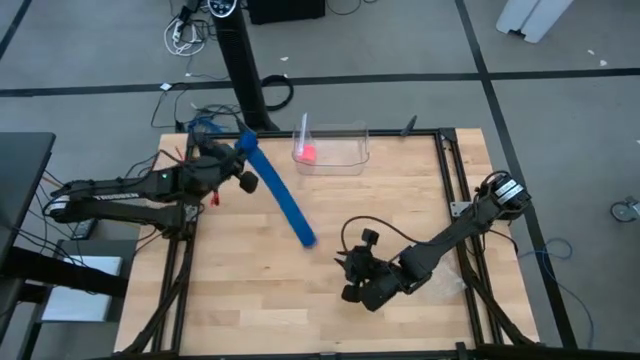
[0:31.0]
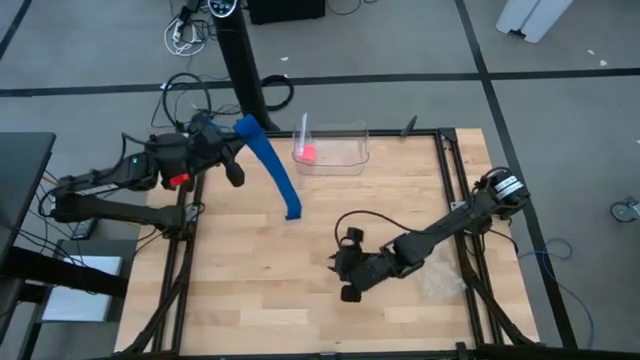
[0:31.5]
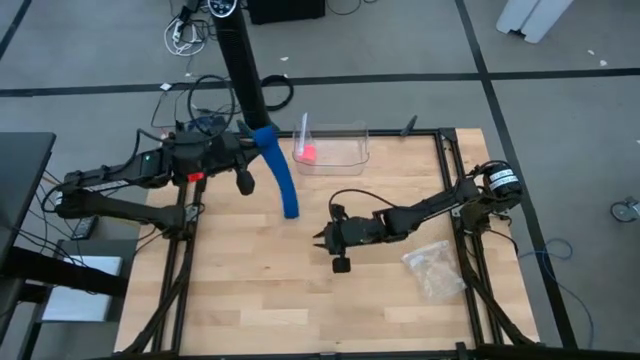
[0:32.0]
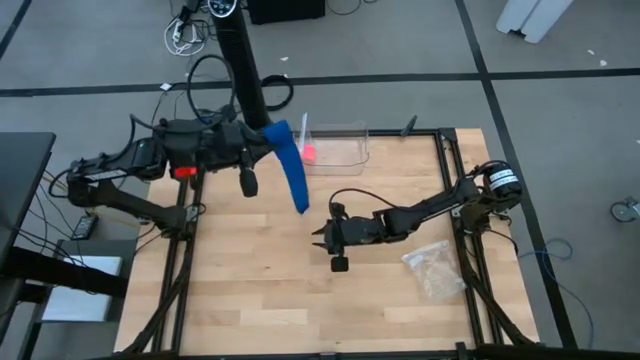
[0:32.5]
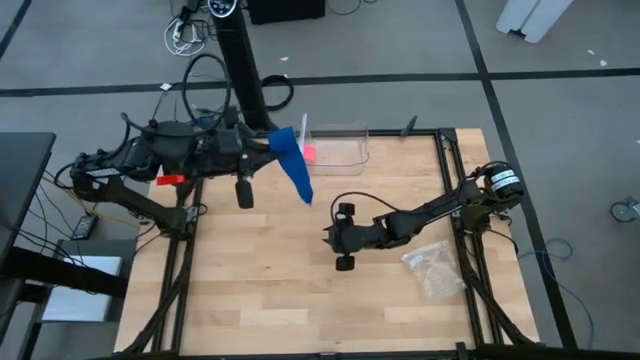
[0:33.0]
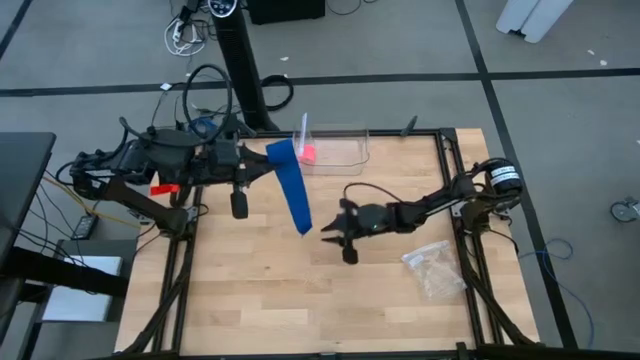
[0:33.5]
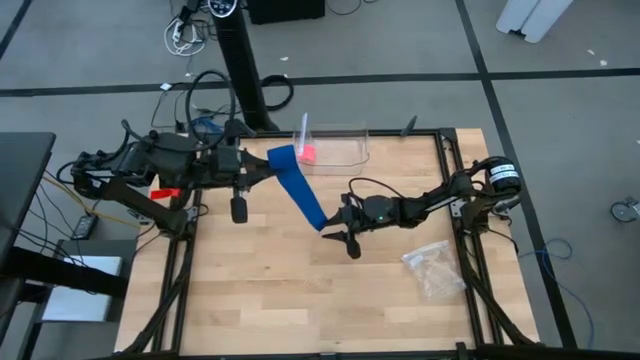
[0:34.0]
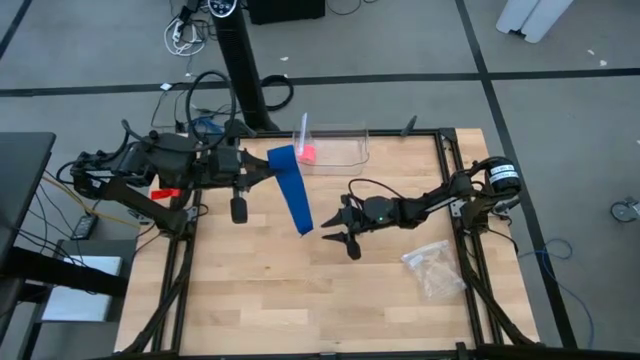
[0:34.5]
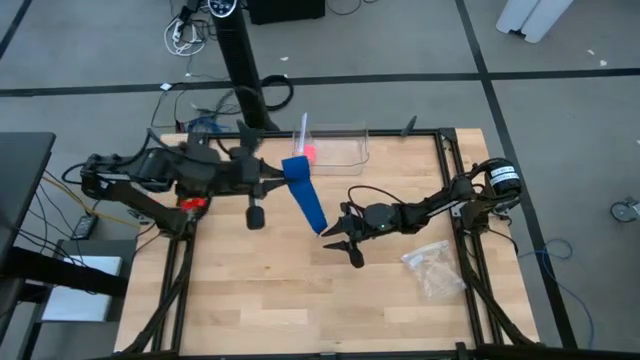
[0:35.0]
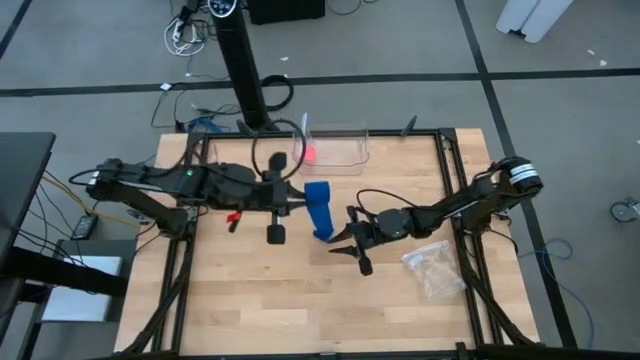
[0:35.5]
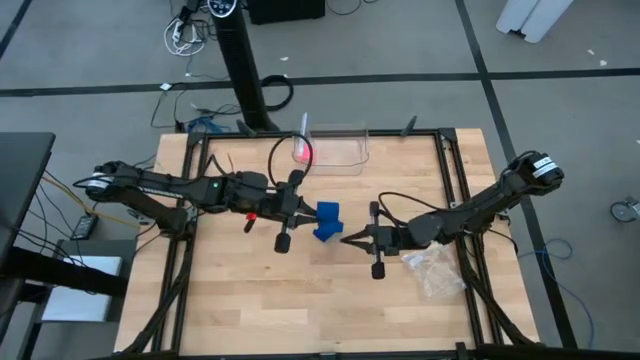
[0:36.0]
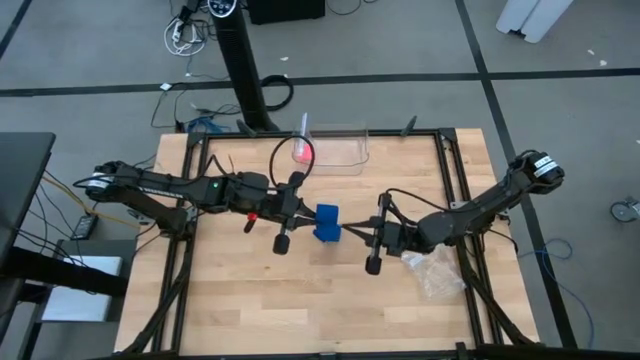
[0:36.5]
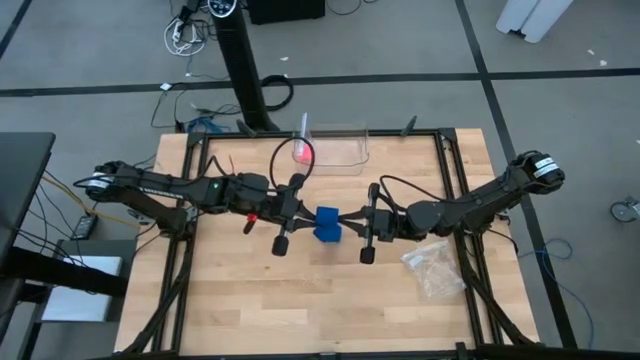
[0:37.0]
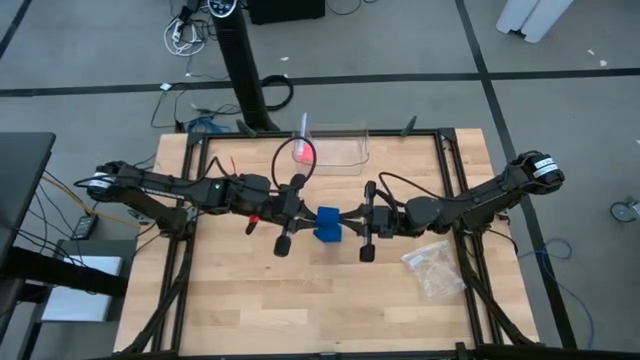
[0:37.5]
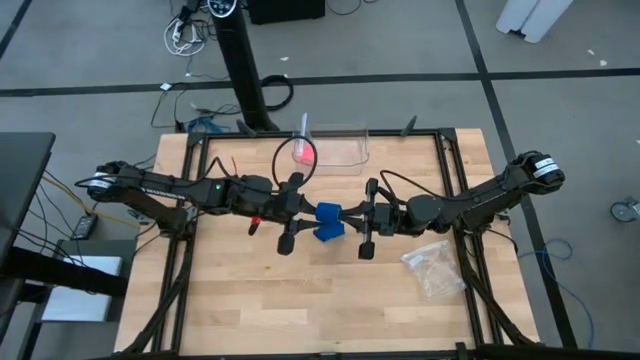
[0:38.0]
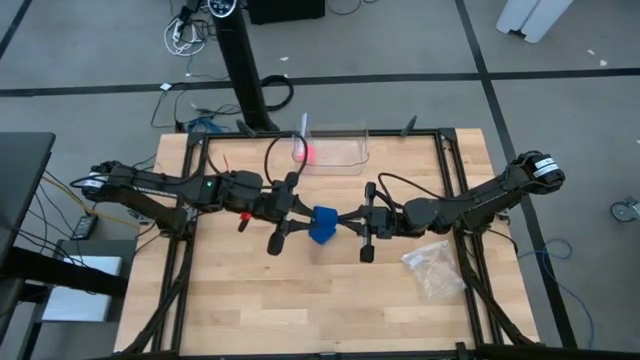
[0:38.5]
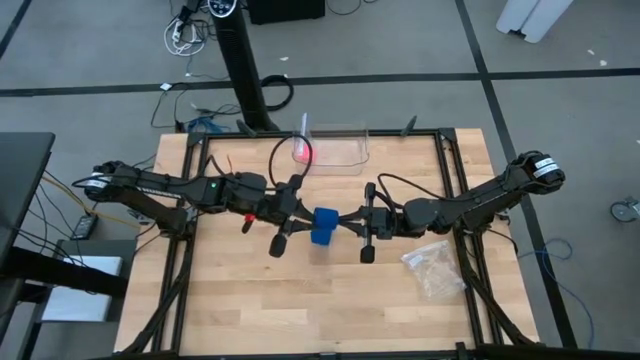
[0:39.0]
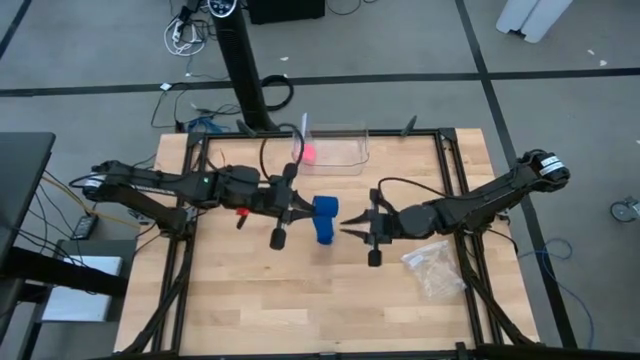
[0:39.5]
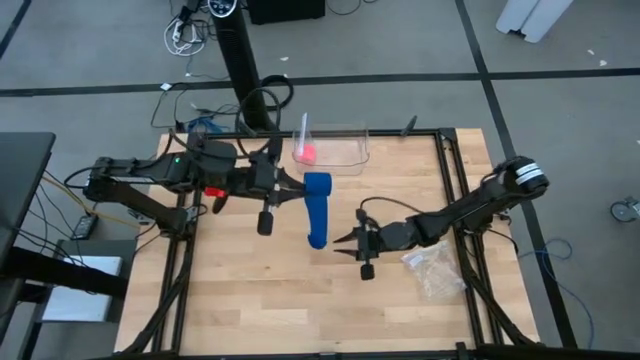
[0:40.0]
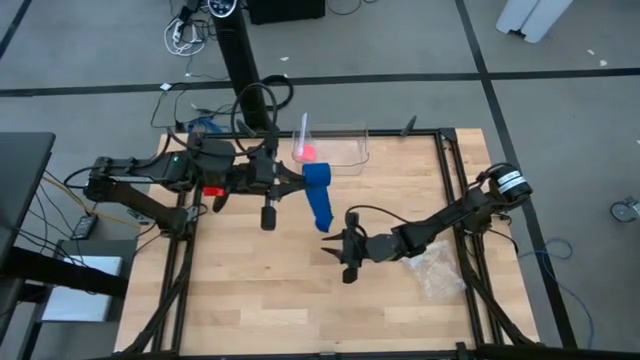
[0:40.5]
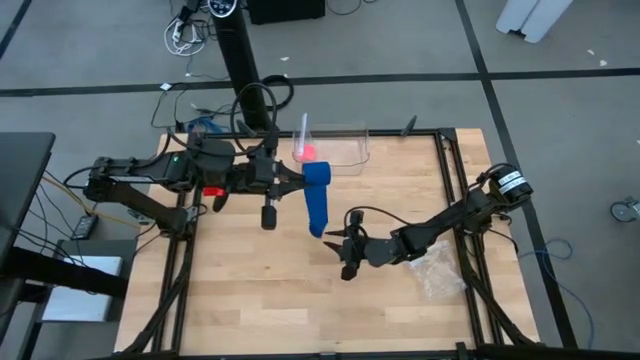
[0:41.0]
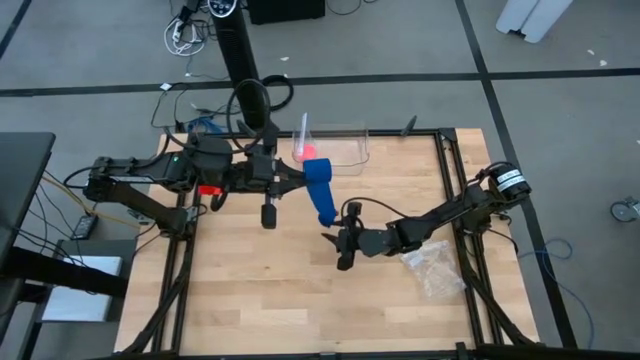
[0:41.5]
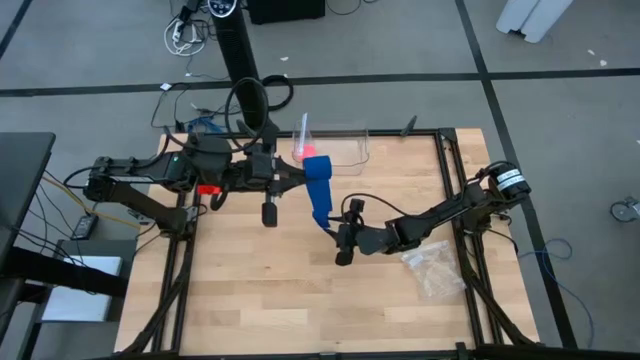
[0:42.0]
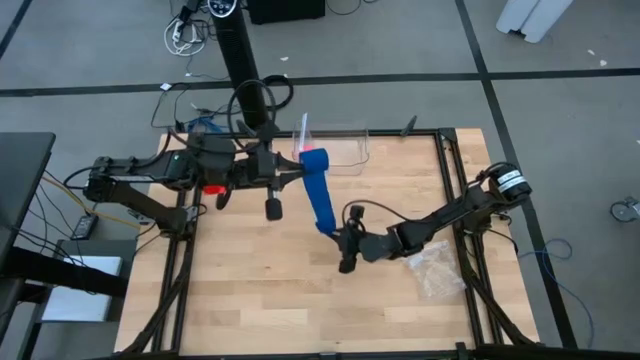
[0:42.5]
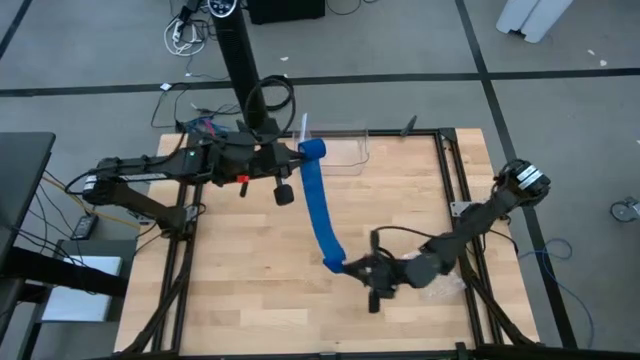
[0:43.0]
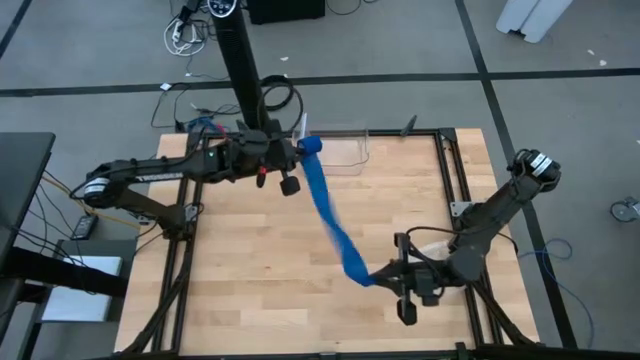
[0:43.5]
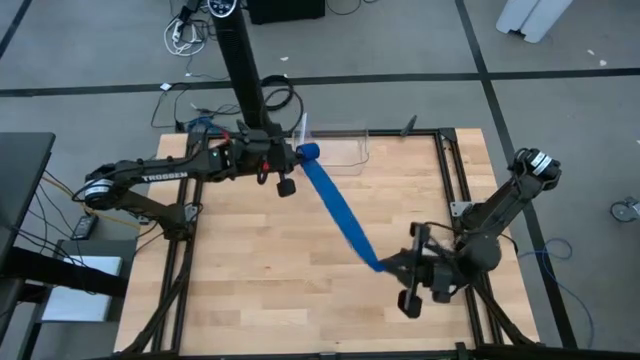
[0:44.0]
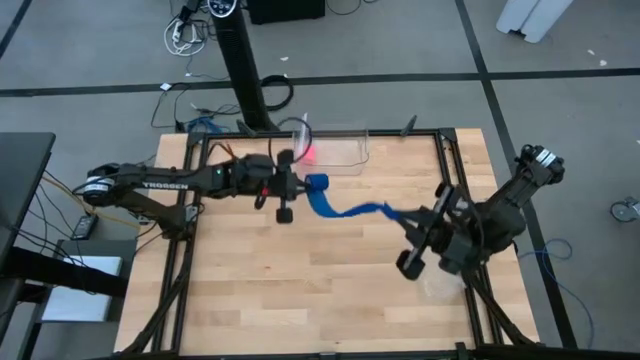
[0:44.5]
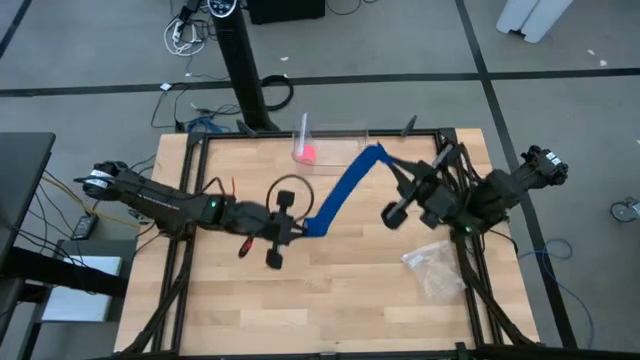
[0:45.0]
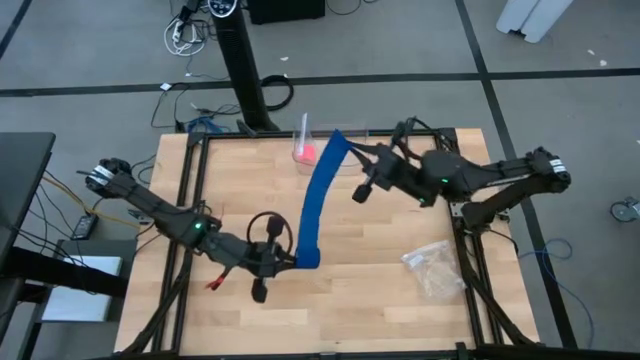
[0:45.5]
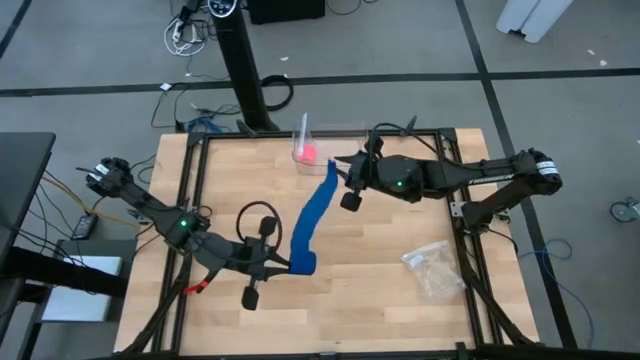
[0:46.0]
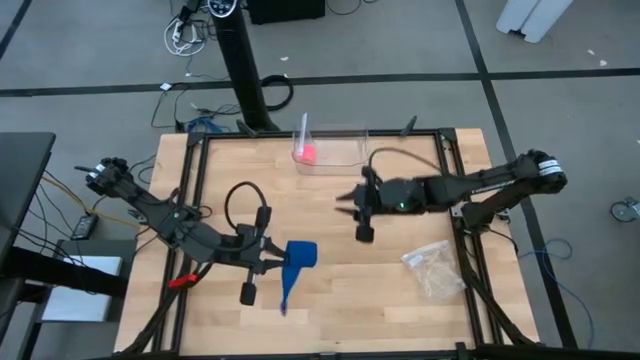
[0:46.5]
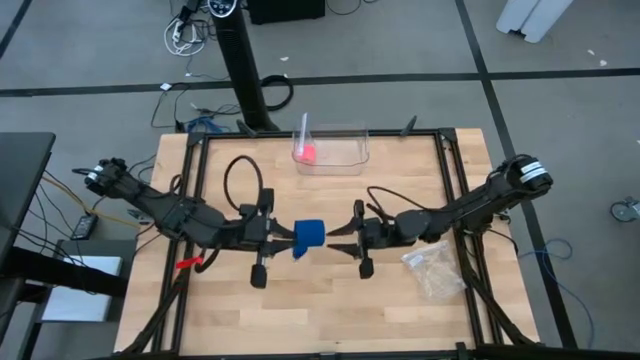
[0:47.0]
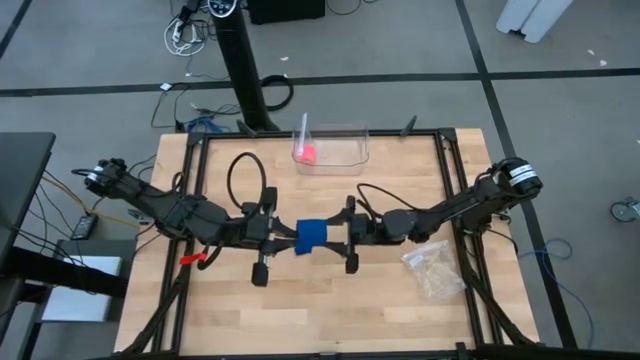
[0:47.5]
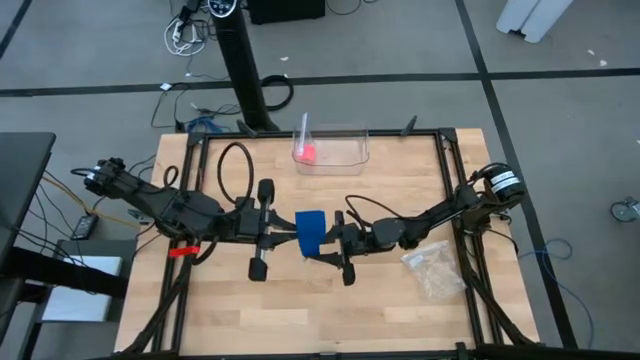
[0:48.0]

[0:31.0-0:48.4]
Task: Roll bandage
Roll the blue bandage

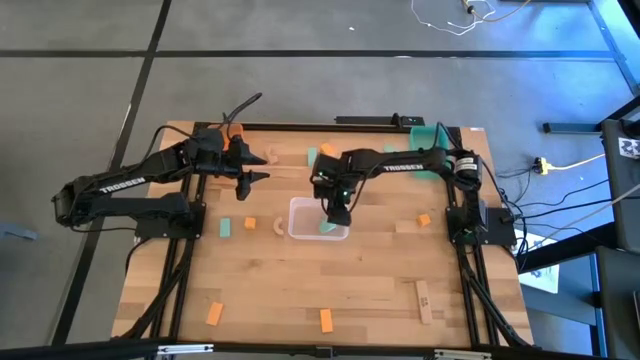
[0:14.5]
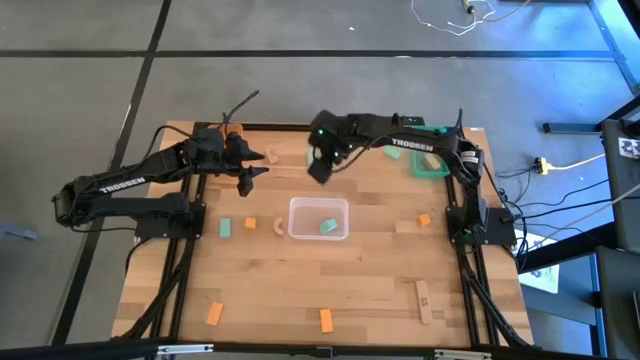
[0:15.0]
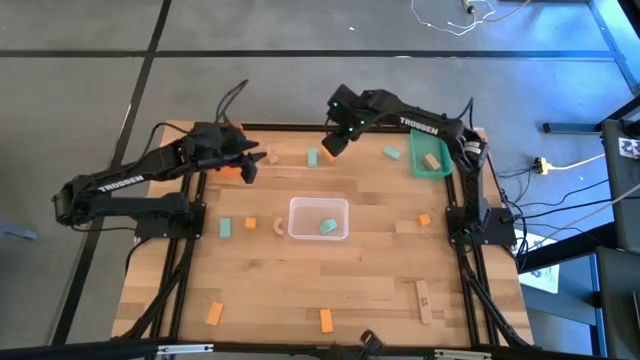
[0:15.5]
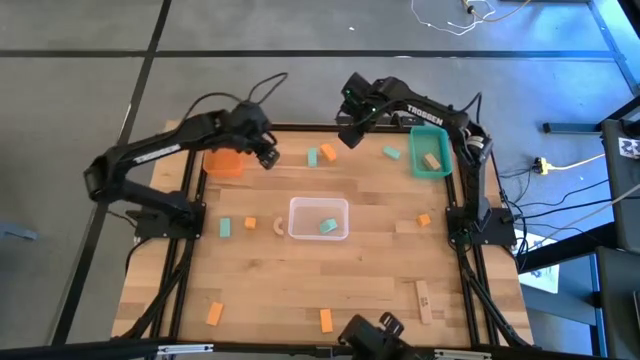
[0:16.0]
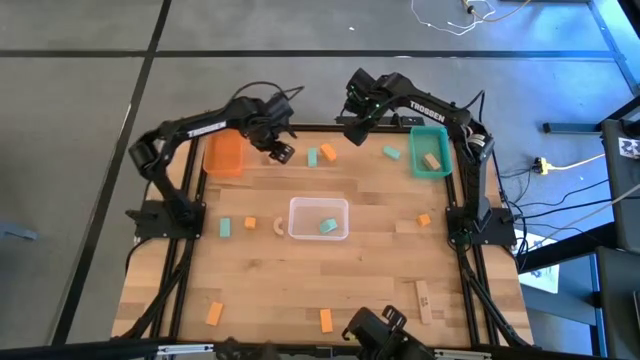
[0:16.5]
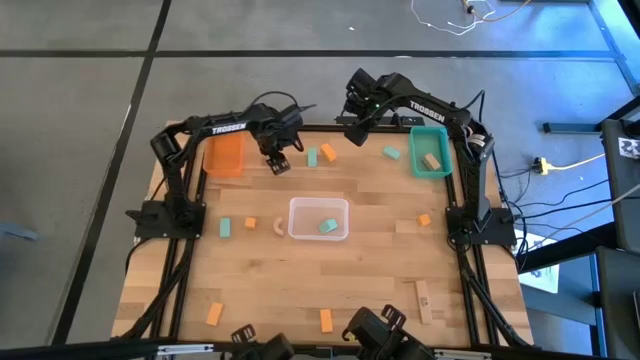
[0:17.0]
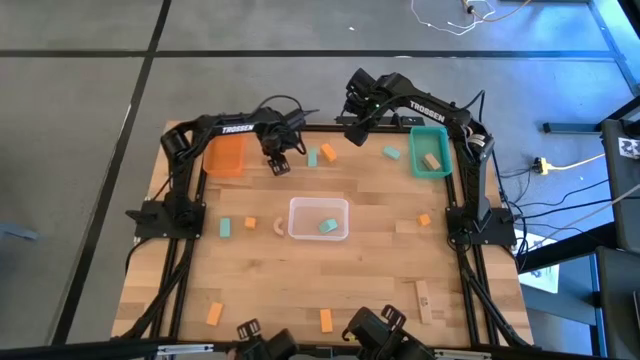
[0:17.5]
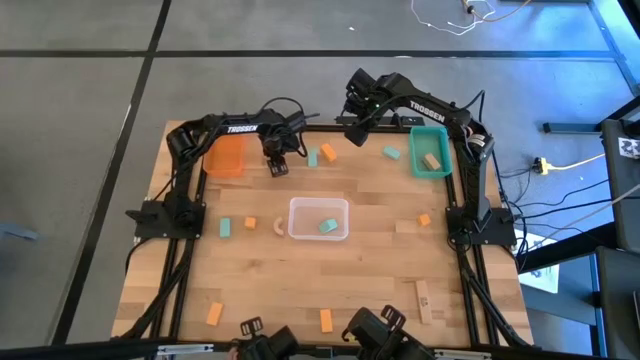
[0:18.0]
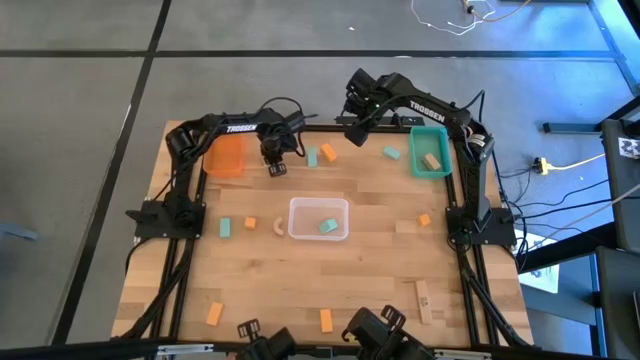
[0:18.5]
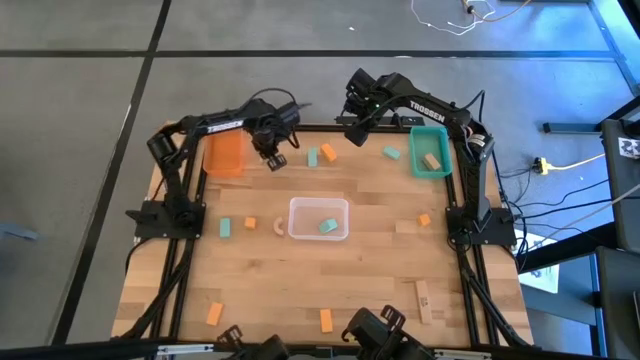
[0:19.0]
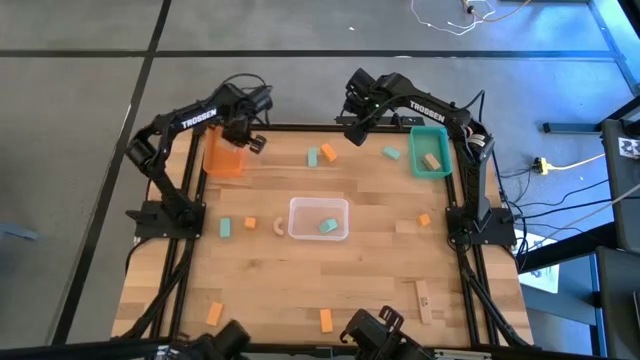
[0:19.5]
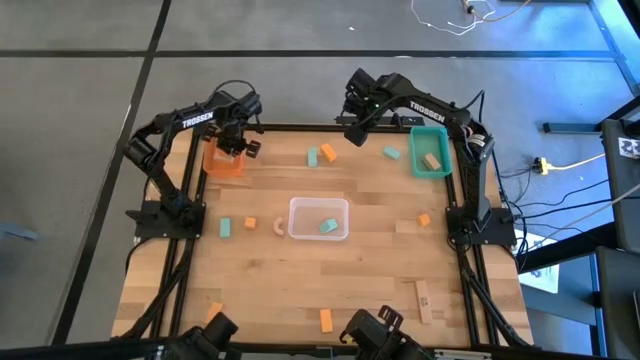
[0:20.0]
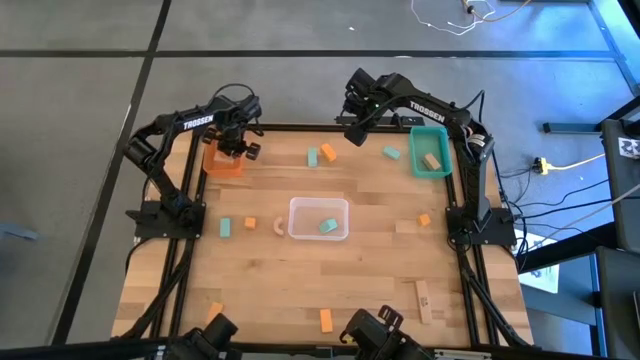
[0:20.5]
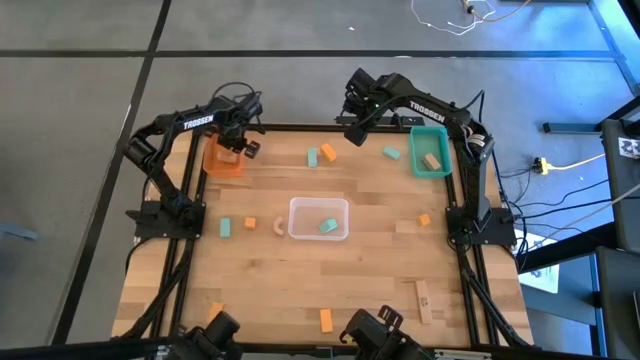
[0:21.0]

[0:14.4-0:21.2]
Task: Sort & place blocks by color
Put the light brown block into the orange bin
